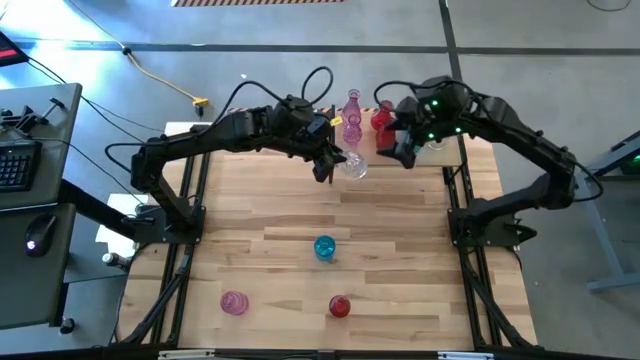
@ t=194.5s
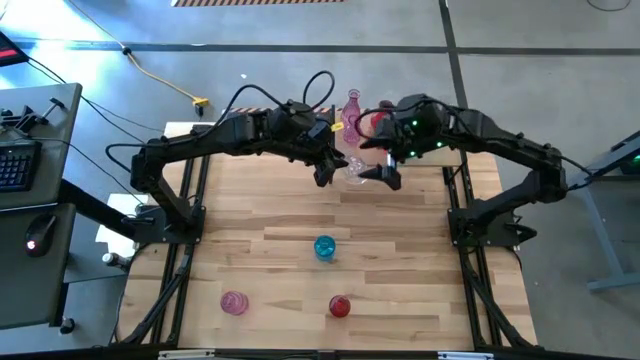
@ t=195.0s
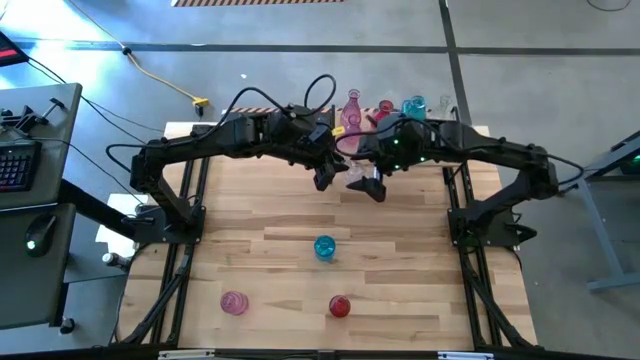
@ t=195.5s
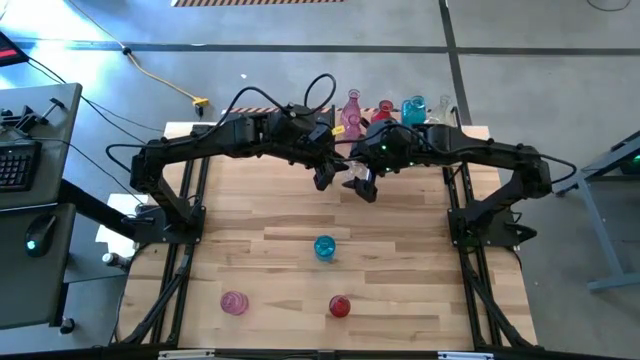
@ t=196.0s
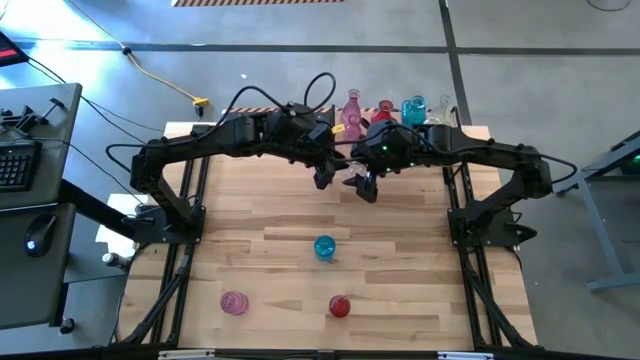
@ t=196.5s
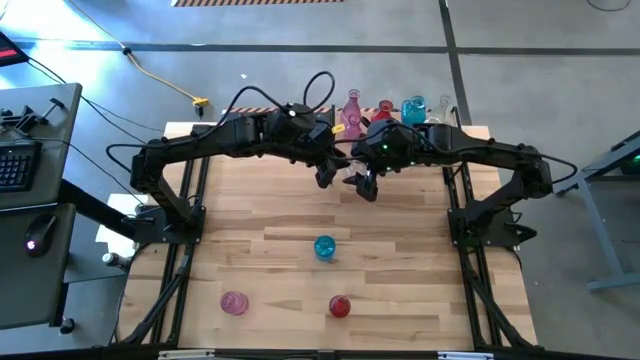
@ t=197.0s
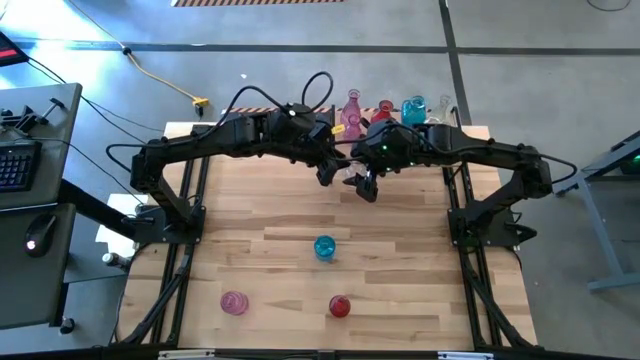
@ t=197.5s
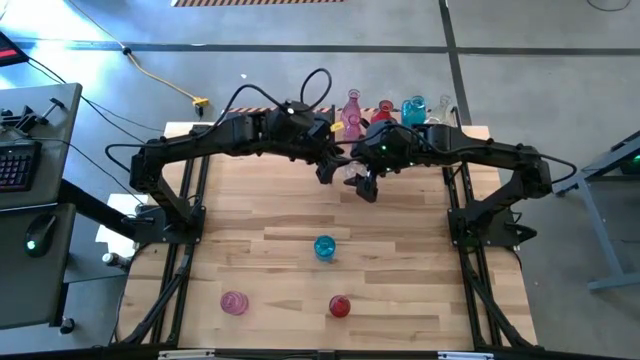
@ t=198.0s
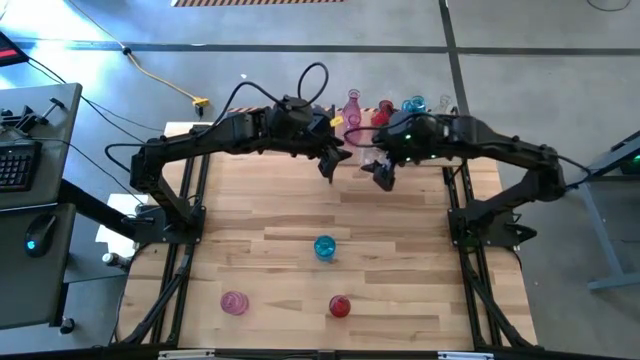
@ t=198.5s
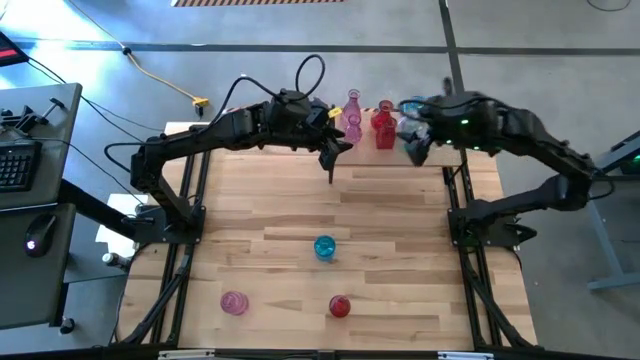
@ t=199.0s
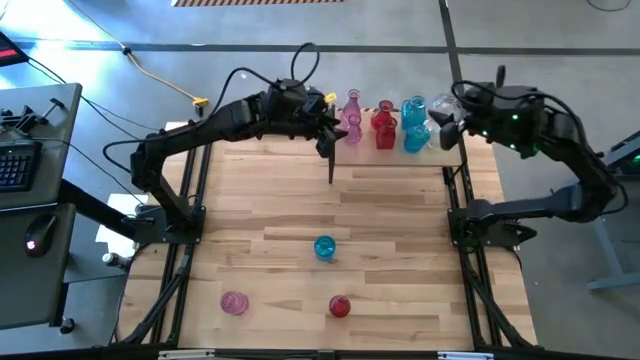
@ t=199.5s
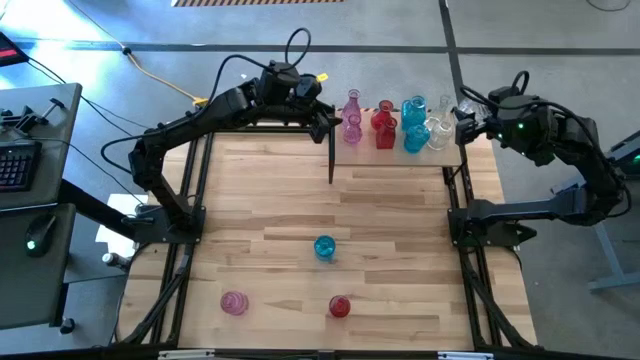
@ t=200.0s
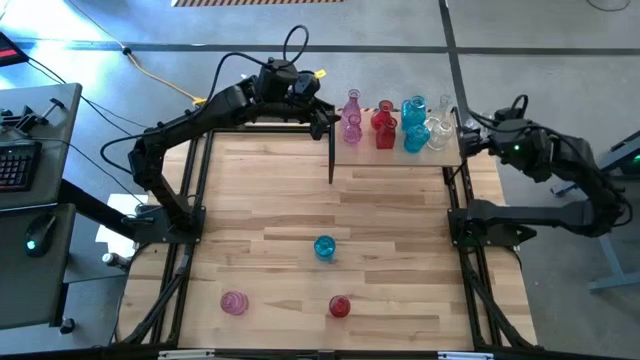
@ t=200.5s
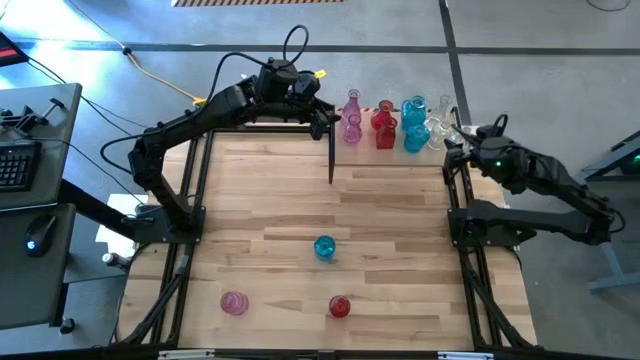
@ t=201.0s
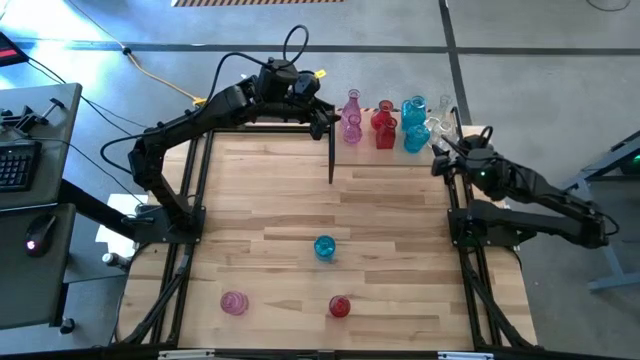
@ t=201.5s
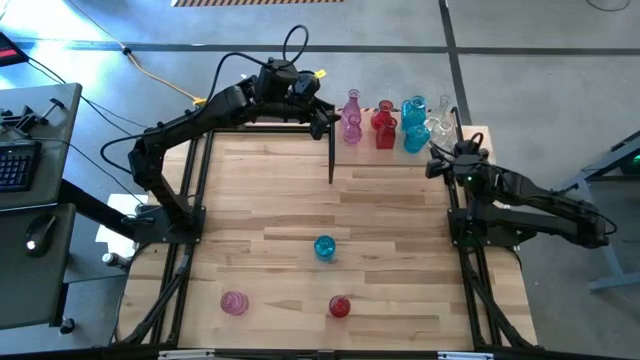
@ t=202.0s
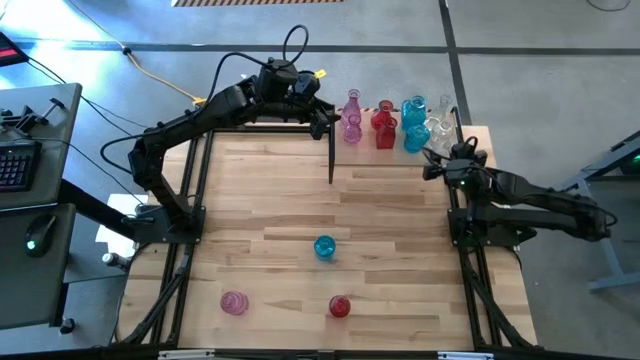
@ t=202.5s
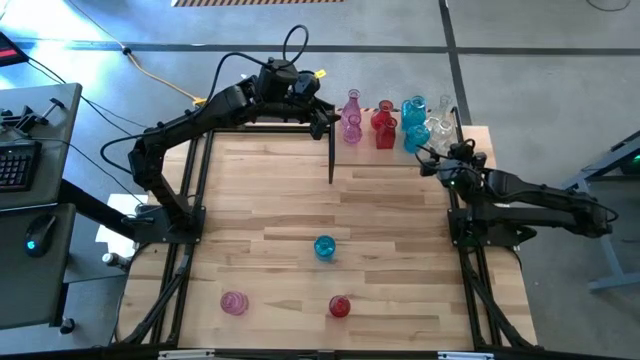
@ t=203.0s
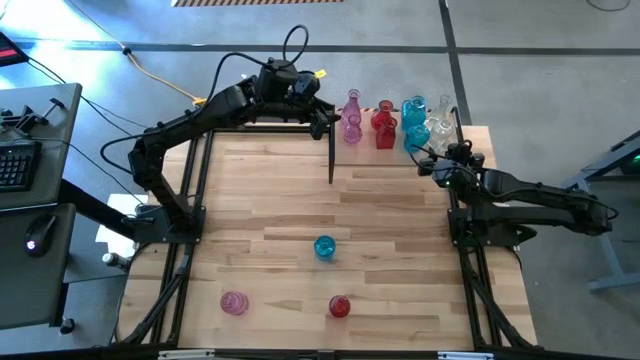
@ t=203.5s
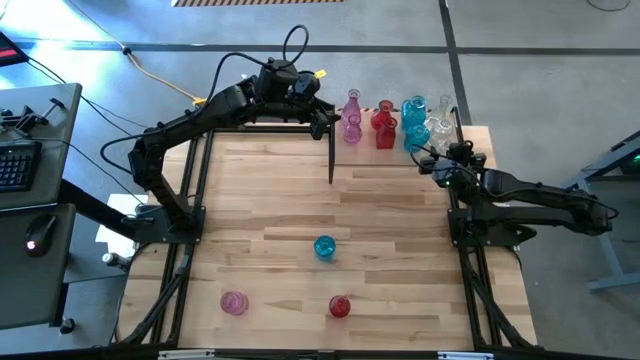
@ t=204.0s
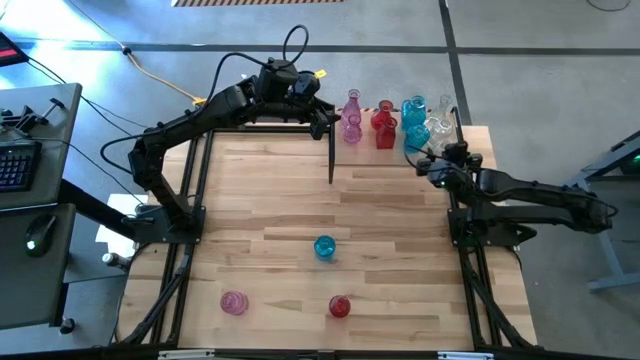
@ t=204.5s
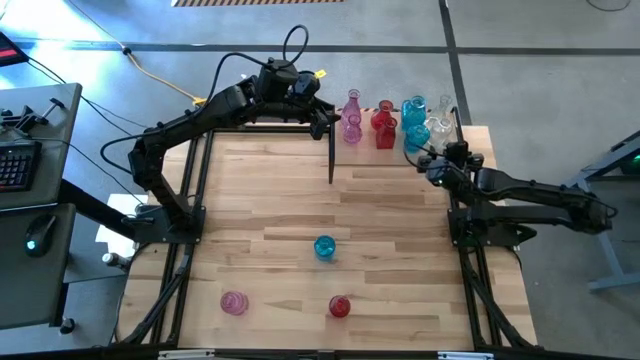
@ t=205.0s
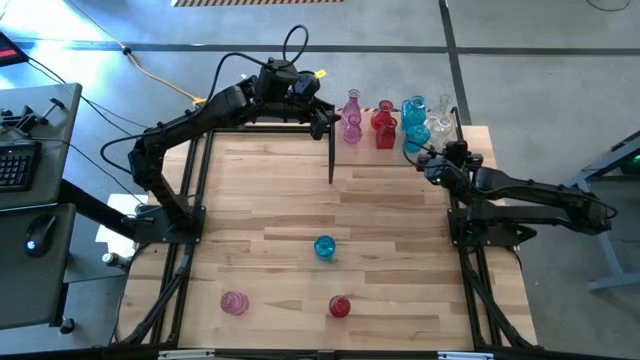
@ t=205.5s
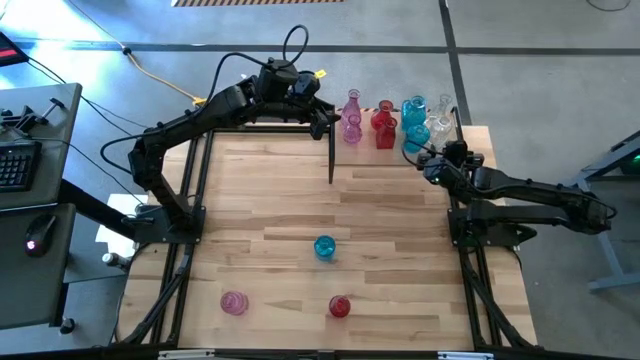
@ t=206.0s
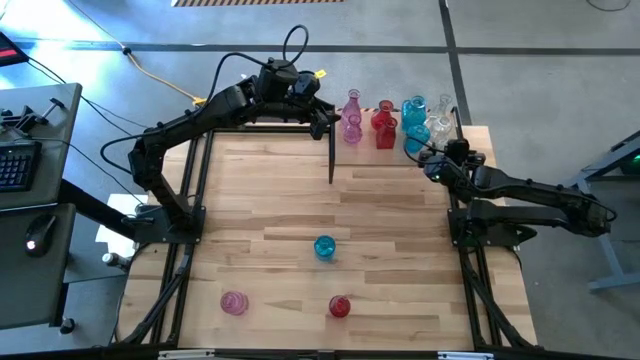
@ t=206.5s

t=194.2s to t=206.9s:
Task: sort vases onto shelf
Put the transparent vase on the shelf aligned with the transparent vases

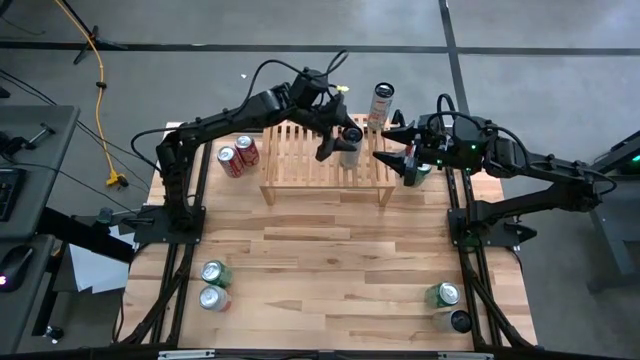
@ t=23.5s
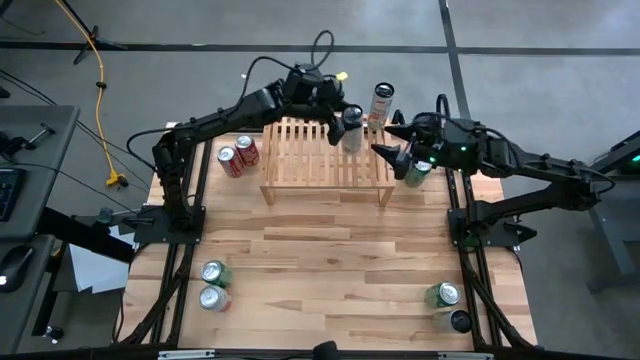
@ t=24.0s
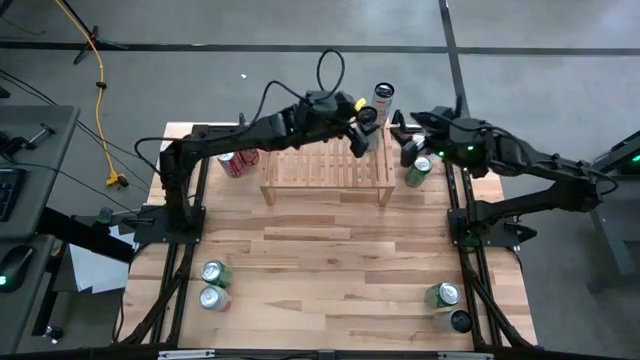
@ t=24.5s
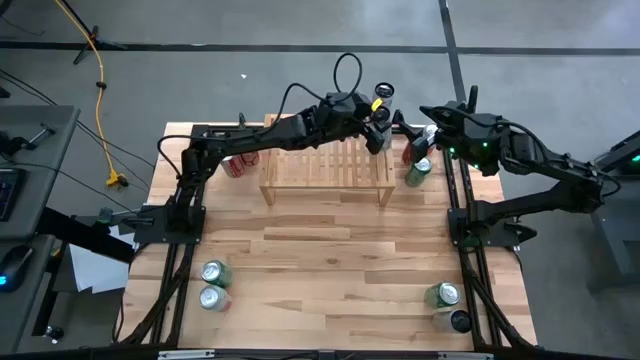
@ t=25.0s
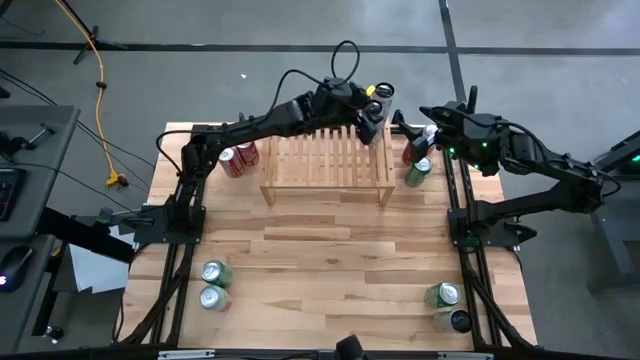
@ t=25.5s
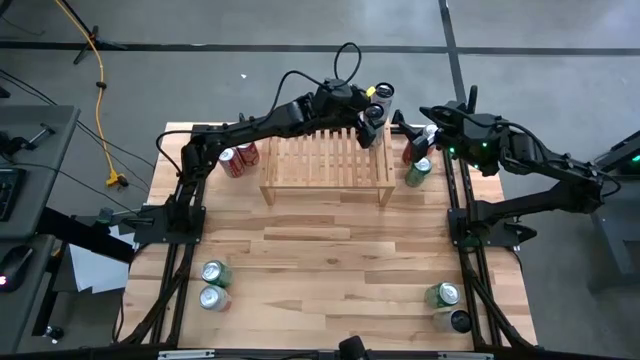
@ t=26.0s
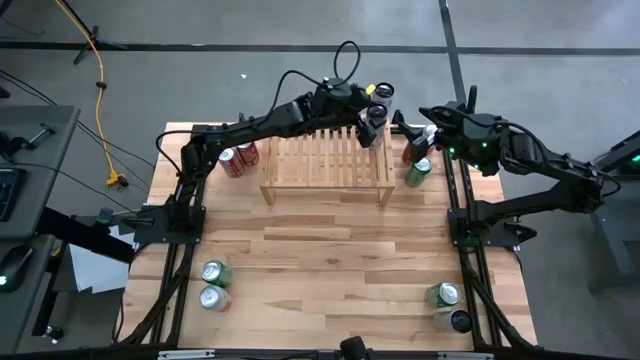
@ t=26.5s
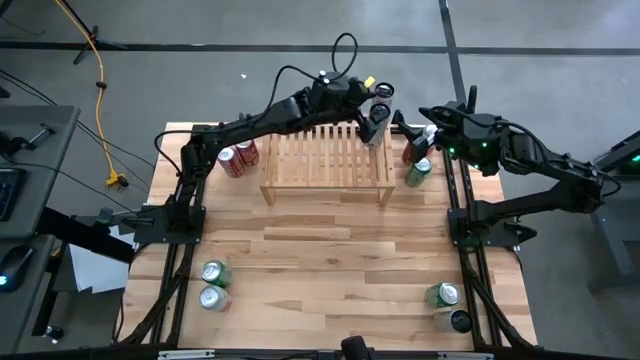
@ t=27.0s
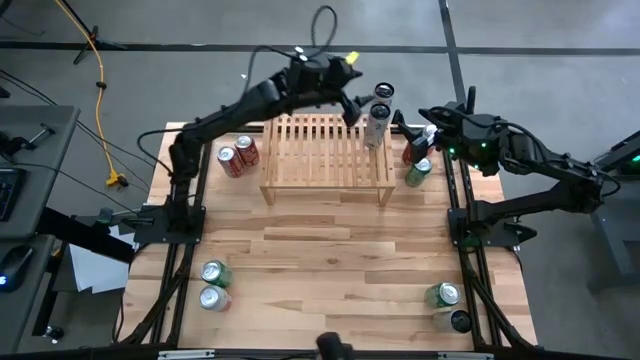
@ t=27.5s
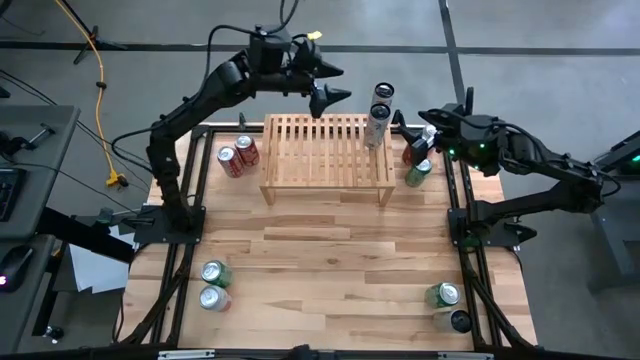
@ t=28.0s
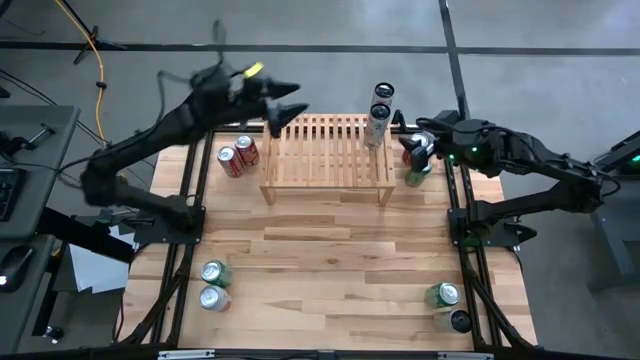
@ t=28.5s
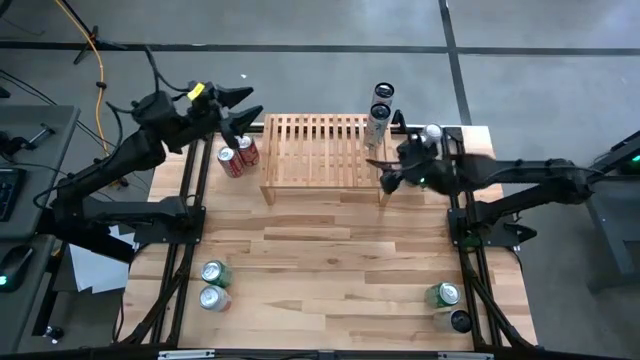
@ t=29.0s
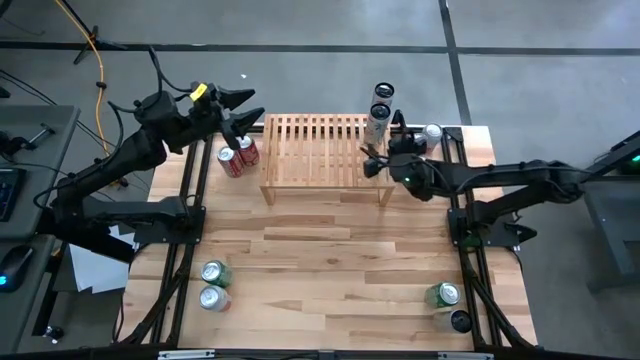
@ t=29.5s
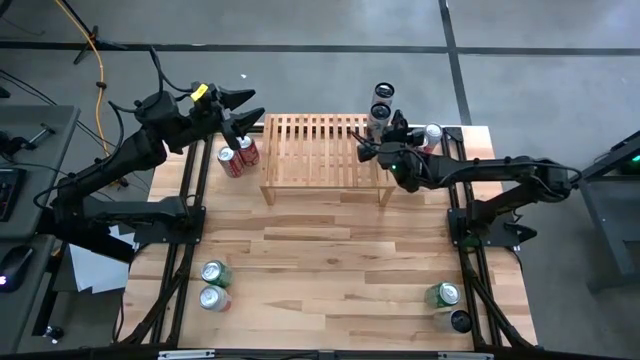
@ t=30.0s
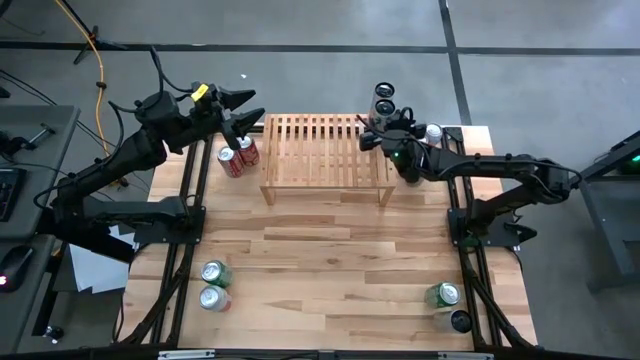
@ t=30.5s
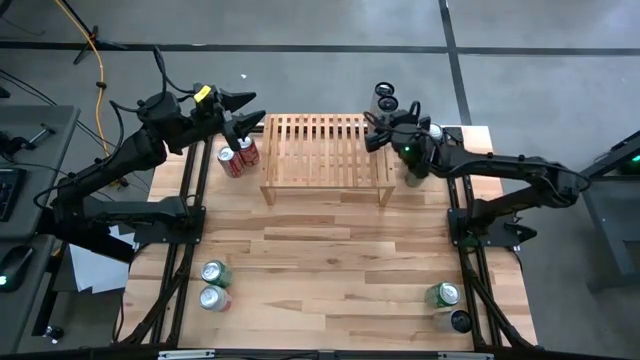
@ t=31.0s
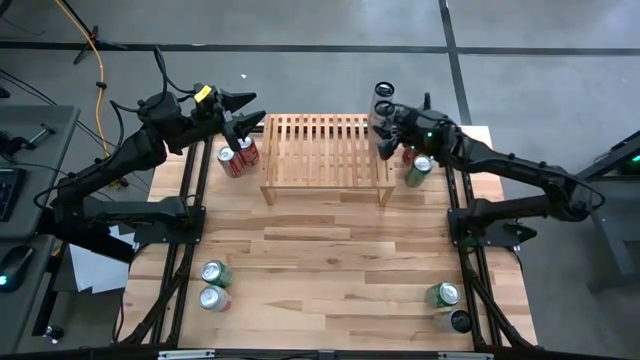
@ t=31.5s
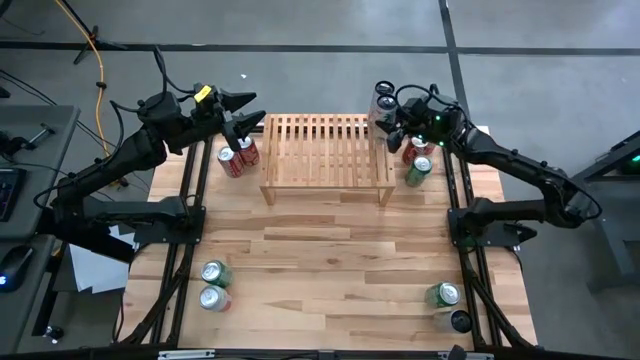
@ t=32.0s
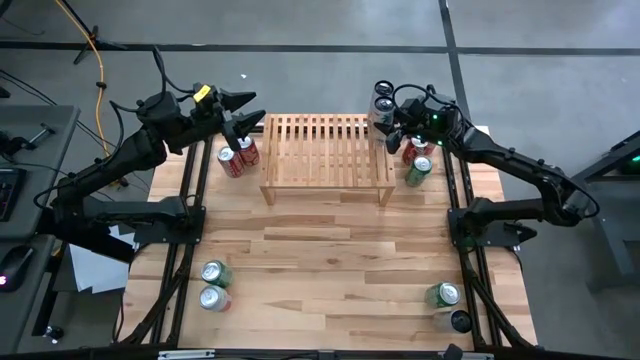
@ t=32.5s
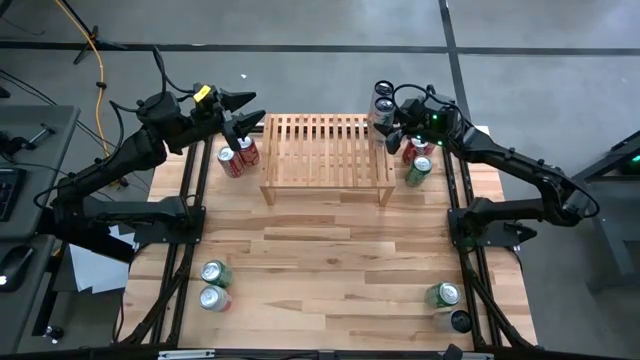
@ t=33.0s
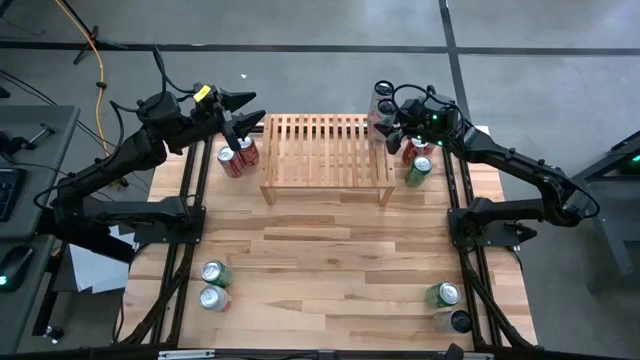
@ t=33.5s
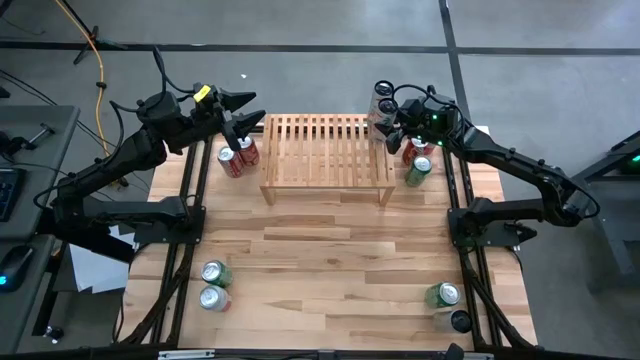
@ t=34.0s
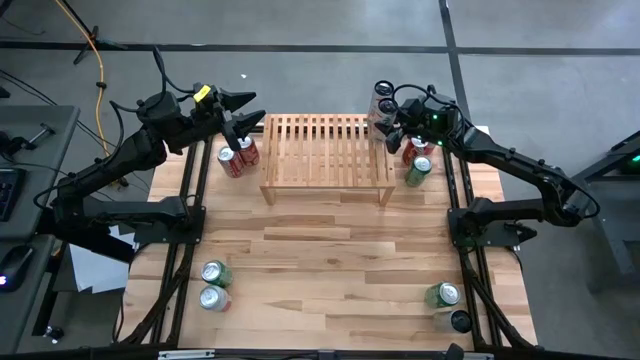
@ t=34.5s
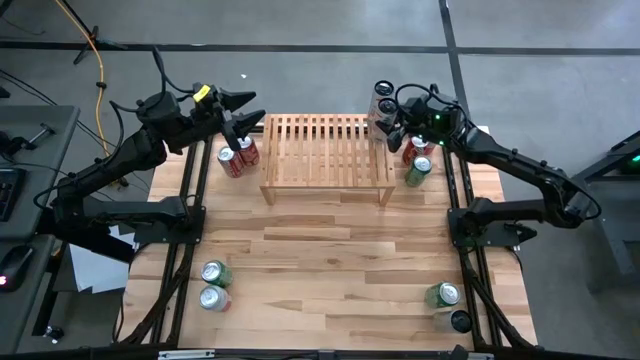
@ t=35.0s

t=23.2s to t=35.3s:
Task: Place canned beverage on shelf
Put the top white pink soda can on the shelf aligned with the other white pink soda can
